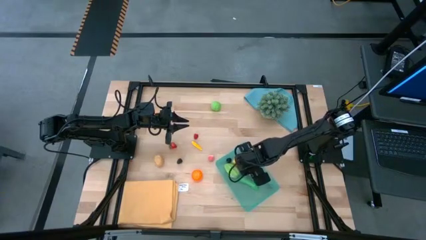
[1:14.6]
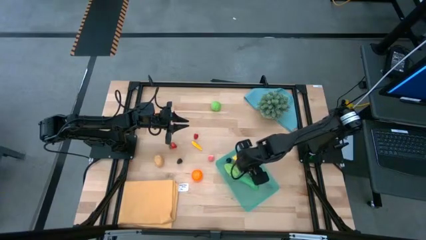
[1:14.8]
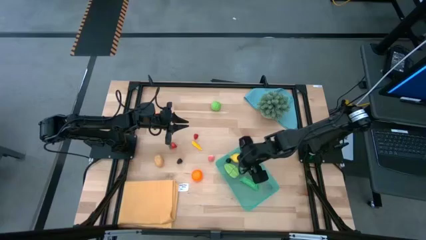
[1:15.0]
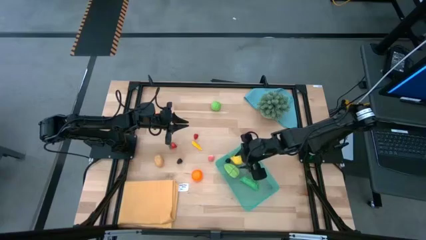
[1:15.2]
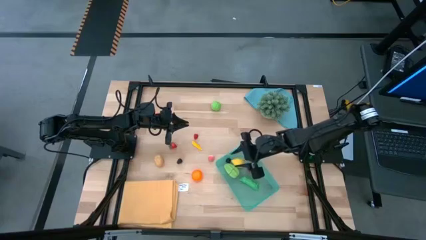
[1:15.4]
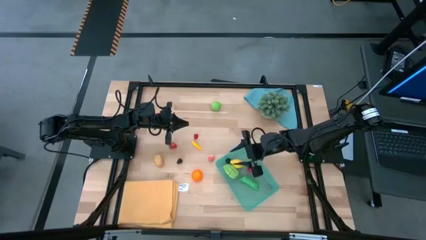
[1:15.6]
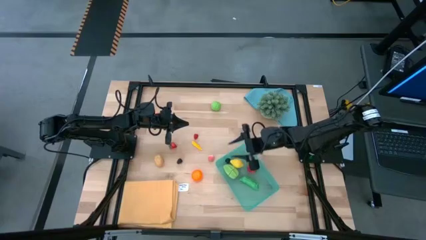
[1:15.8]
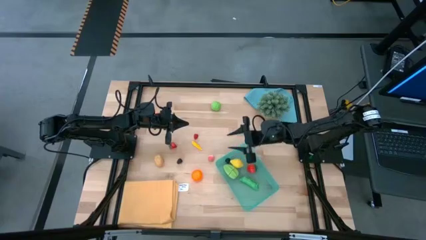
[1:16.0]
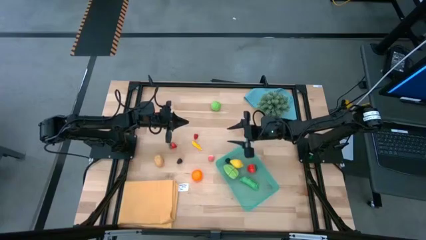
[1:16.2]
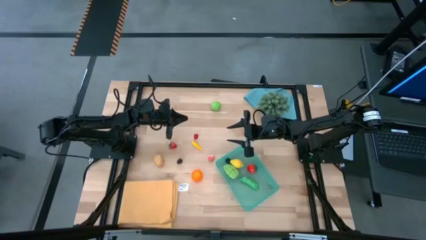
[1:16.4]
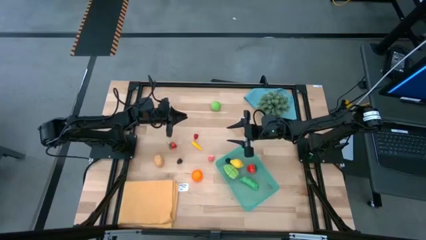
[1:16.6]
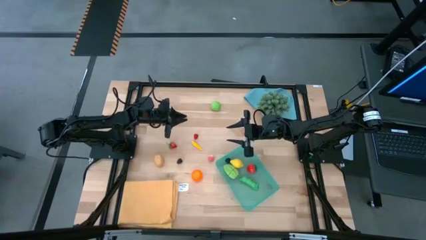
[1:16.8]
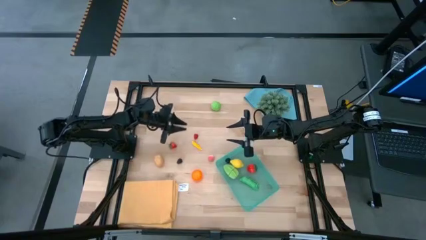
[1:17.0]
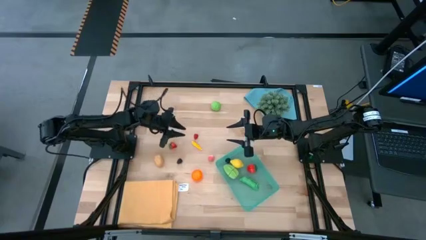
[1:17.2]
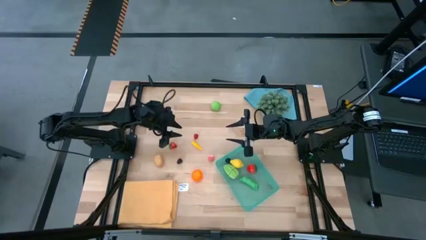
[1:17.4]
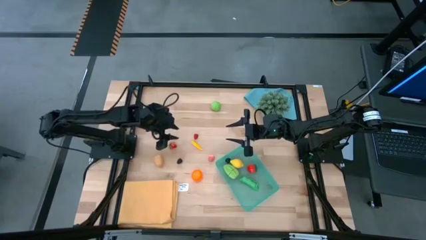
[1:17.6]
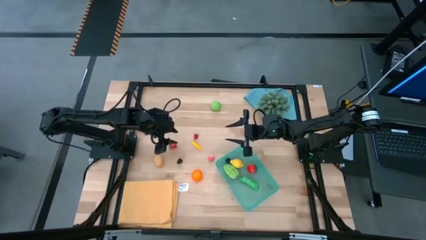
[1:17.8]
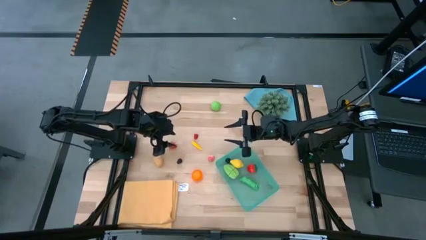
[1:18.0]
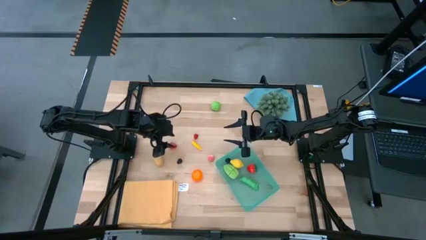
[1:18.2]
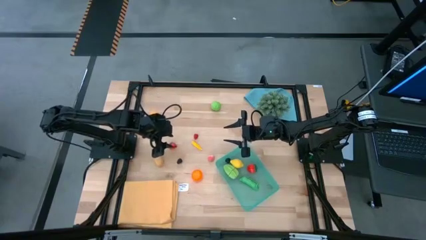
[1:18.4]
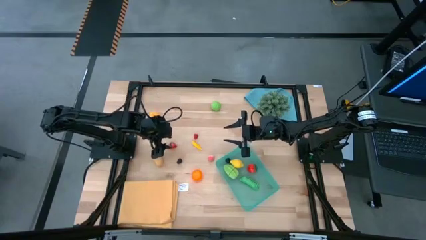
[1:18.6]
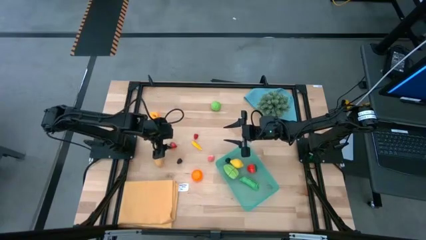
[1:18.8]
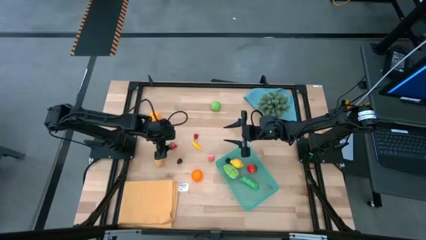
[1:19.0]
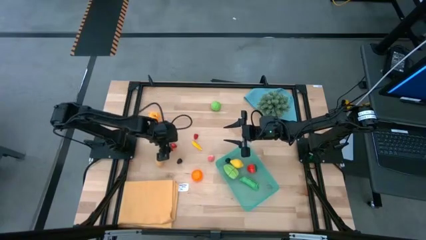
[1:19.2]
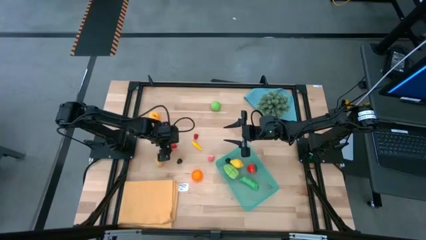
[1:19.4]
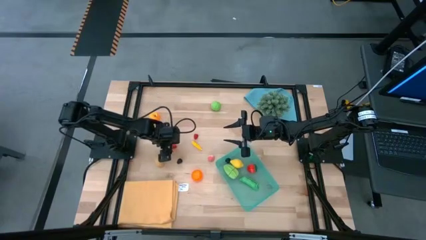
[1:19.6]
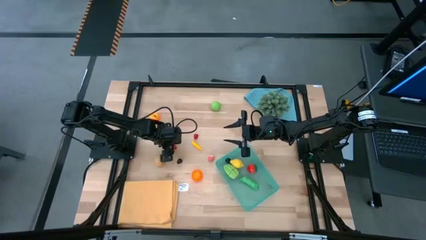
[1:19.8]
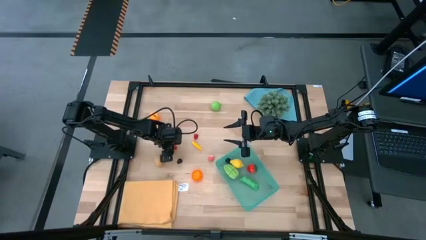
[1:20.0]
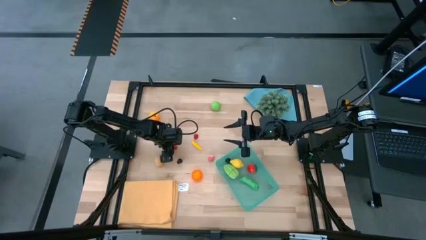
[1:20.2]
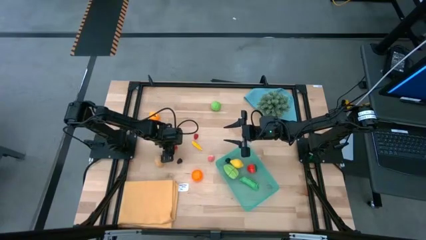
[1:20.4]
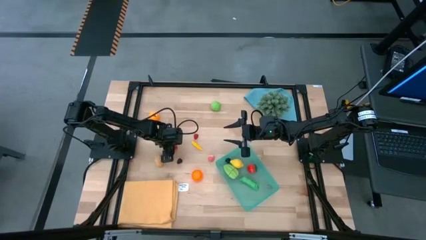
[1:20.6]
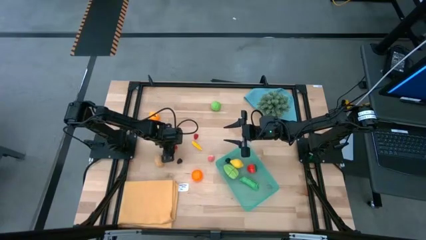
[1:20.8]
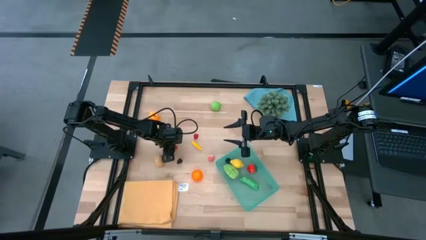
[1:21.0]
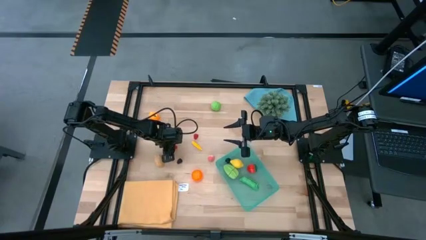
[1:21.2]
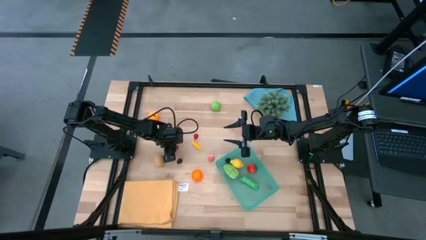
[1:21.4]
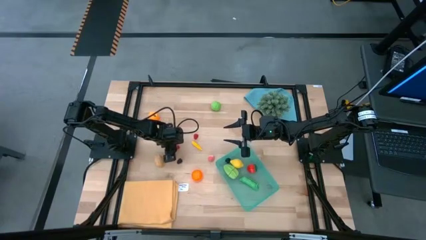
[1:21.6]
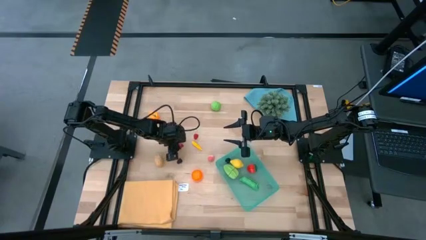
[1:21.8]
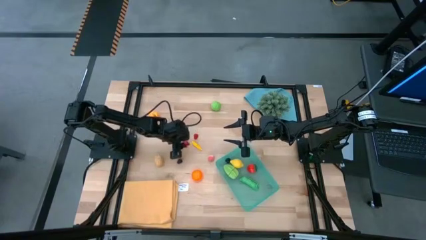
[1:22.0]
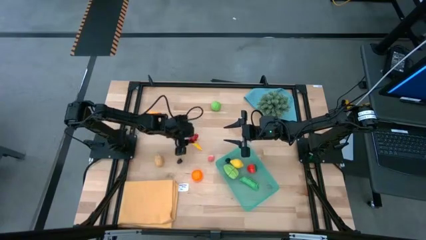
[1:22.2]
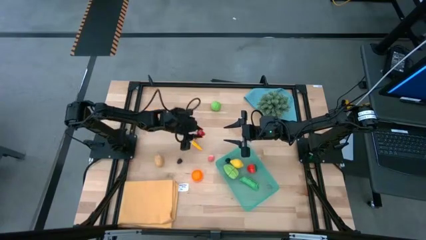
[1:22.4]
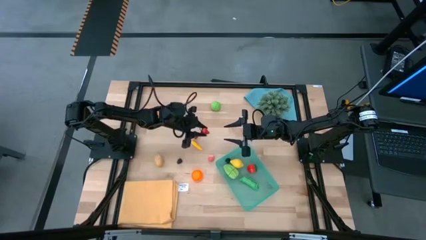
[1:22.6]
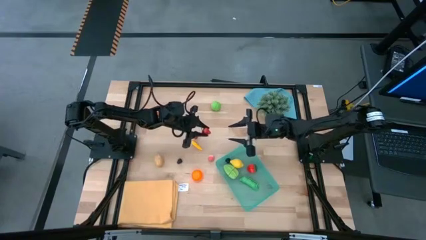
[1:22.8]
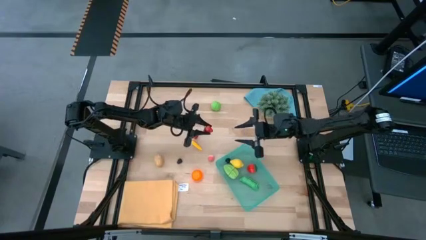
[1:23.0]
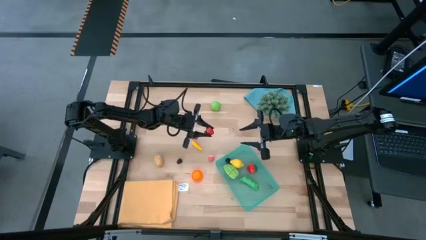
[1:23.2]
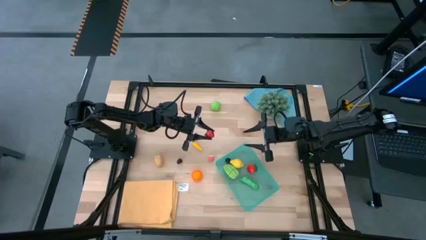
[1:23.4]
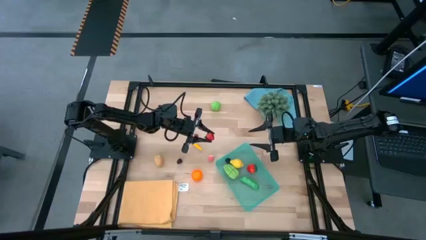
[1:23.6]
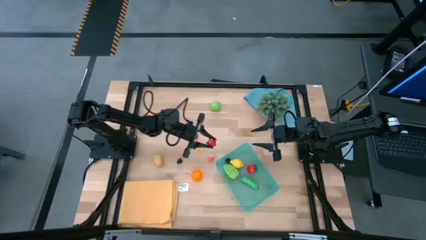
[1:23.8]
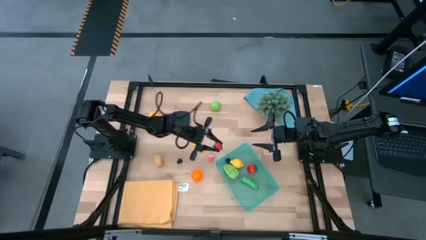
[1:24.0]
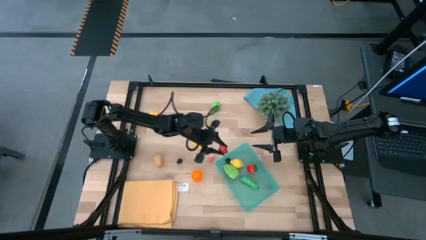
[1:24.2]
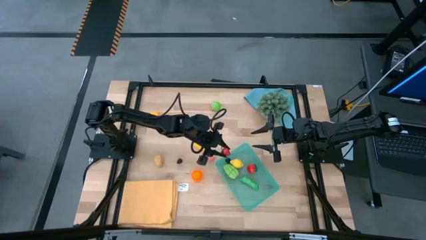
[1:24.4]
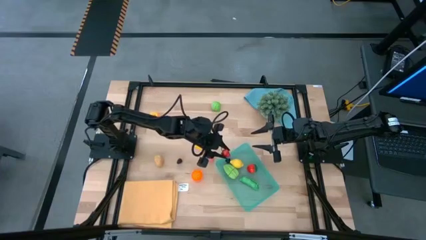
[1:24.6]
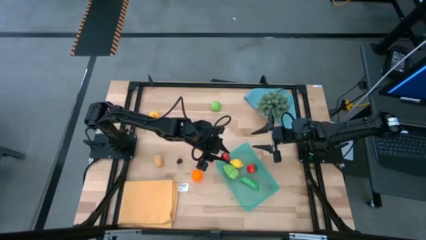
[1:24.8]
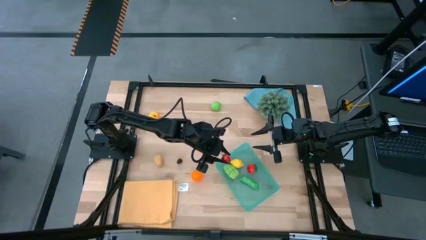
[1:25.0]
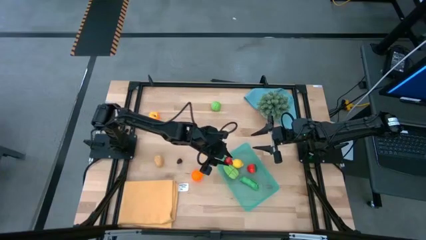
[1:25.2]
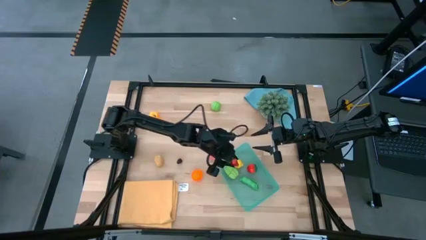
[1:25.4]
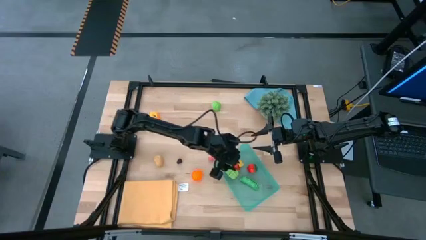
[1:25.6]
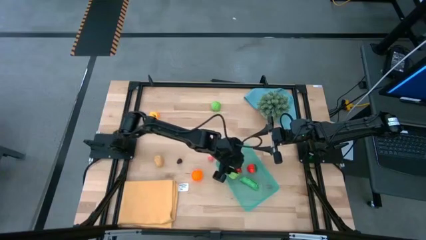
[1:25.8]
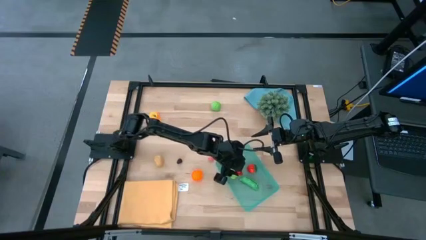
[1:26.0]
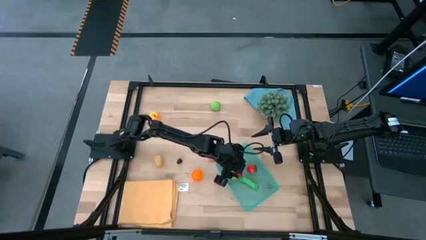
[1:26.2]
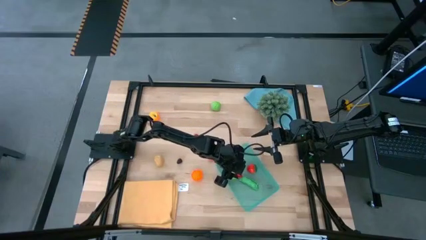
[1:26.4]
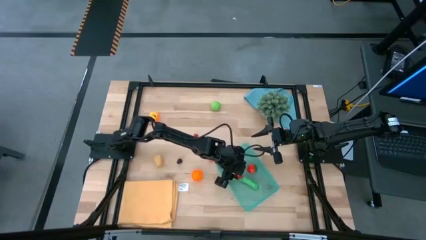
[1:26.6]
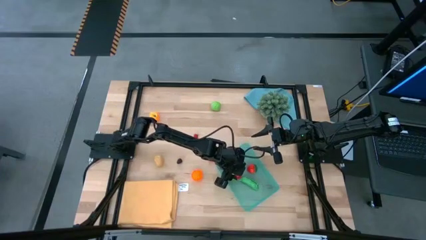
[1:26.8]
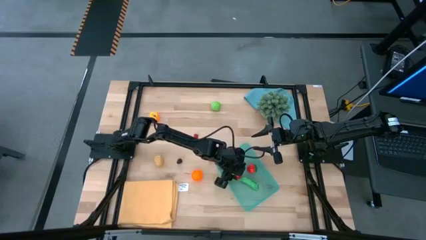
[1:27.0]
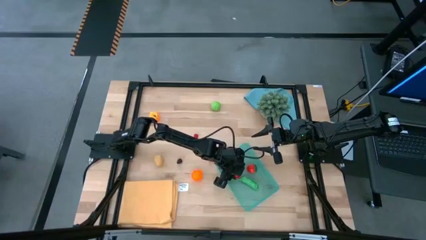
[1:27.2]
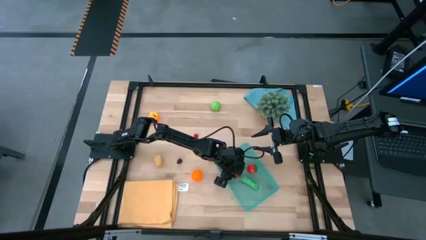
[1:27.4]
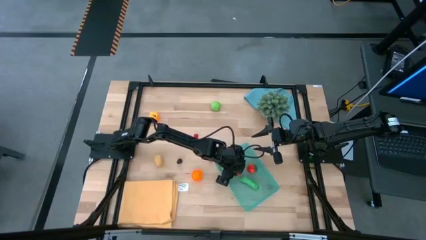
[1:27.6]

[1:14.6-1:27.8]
Task: Pick and placing Produce into tupperware
Put the strawberry into the green bin

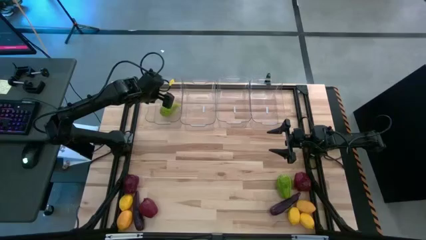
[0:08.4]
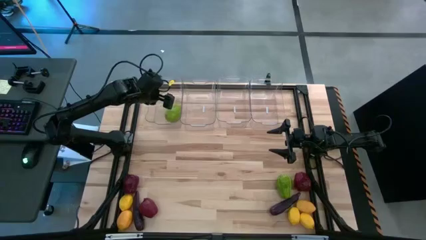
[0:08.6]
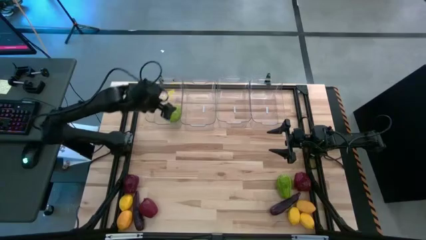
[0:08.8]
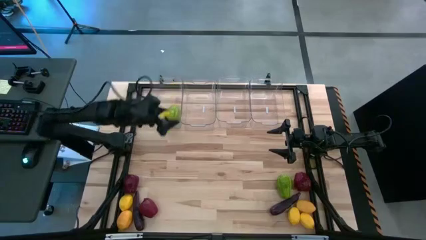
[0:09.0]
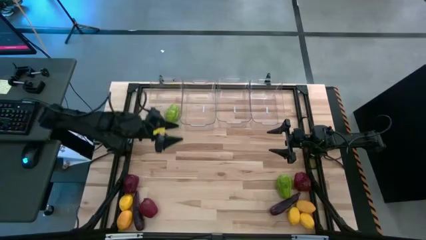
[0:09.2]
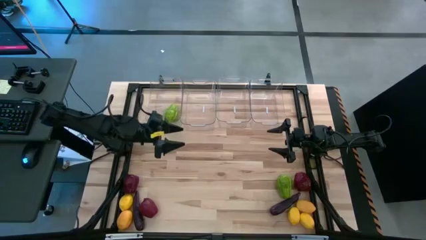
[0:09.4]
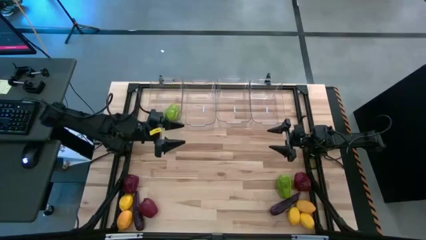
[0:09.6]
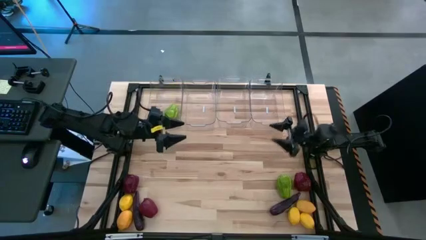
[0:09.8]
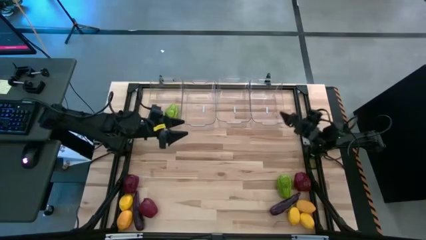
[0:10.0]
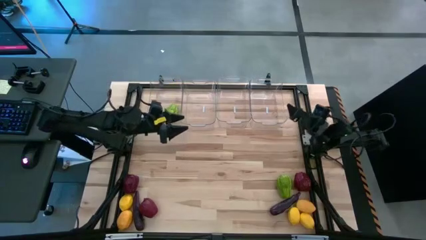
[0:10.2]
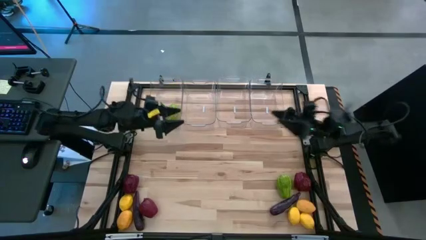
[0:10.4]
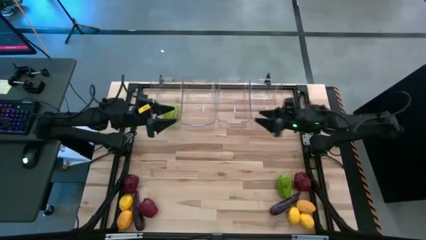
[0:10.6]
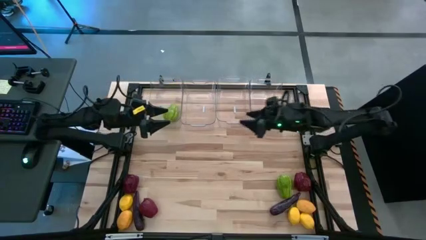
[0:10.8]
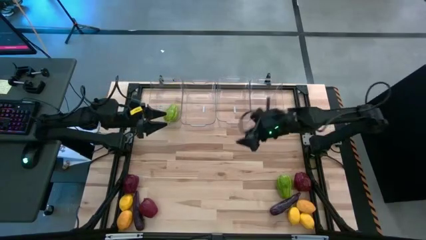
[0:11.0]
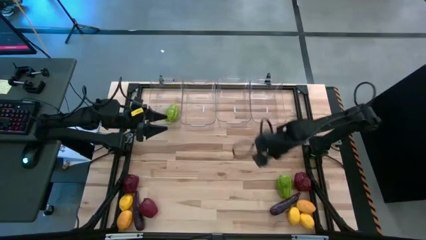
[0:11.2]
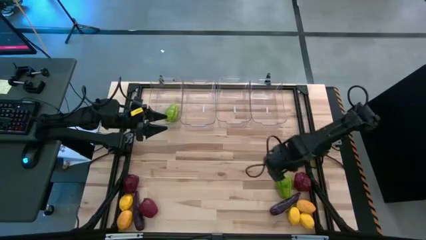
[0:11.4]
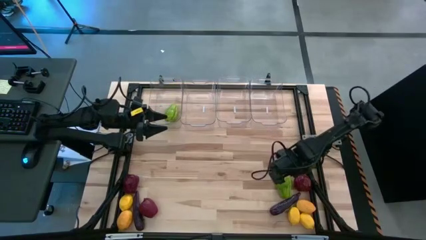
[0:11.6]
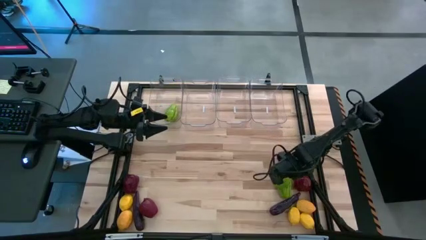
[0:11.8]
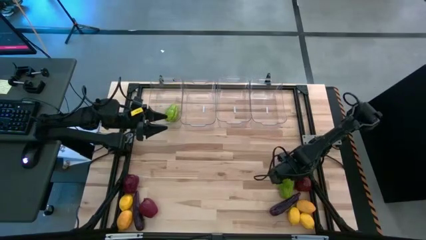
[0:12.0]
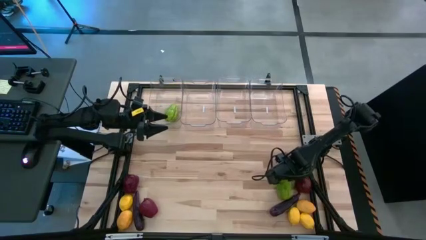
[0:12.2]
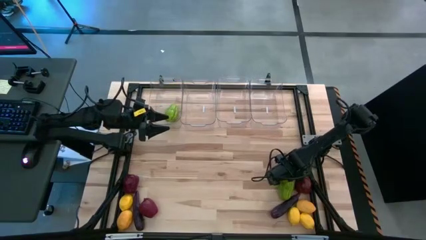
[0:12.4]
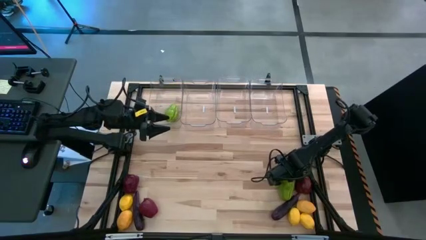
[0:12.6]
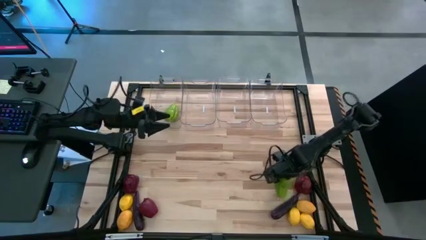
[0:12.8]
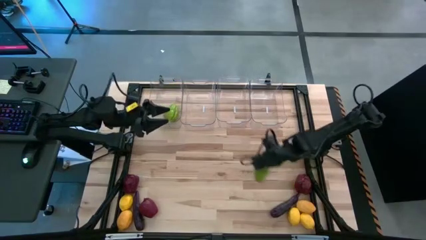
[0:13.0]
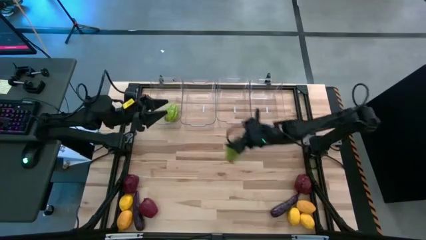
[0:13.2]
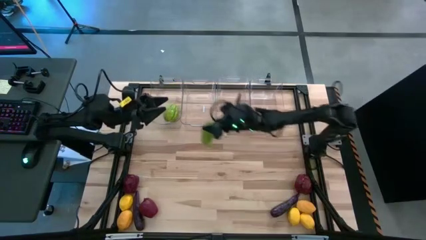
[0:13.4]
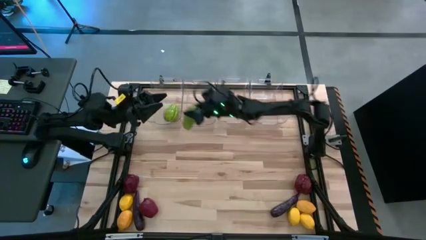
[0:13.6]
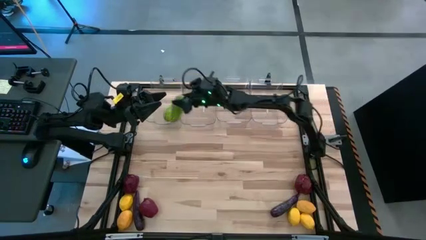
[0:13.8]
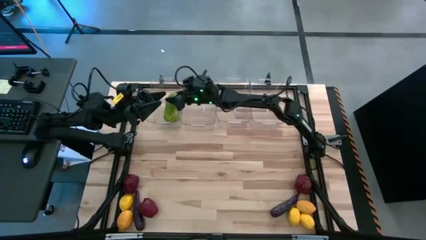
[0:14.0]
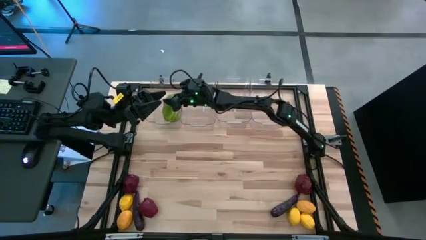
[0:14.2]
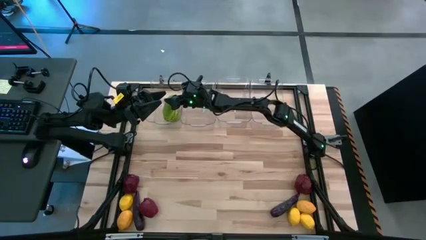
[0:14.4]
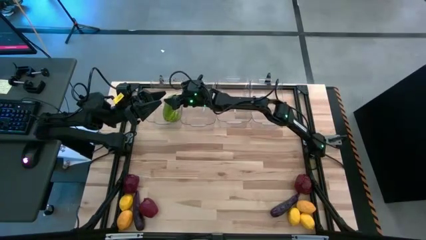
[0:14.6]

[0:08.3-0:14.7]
Task: Sort produce into baskets
Put the chayote into the left transparent bin
